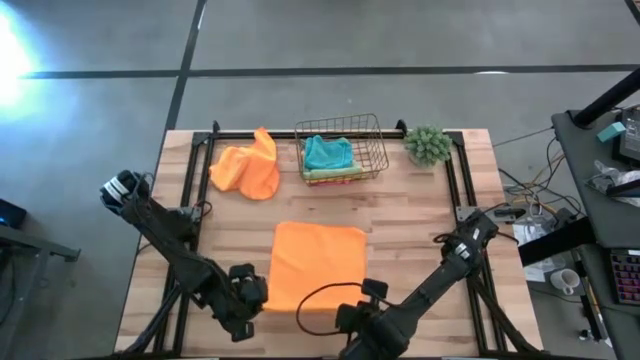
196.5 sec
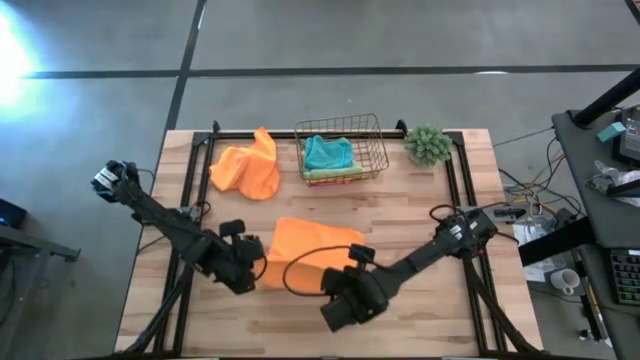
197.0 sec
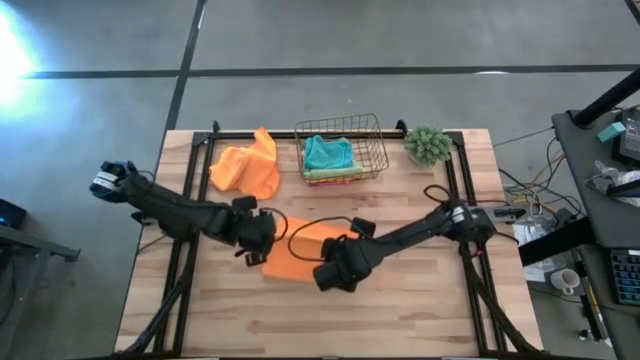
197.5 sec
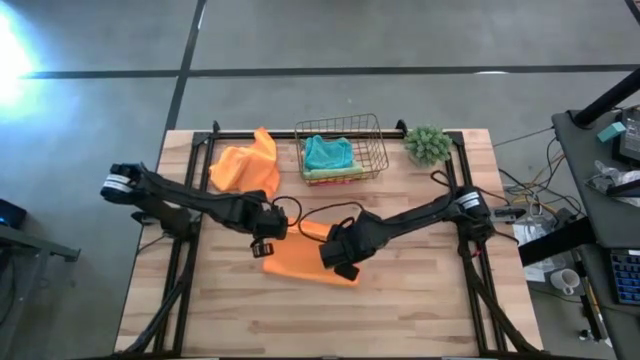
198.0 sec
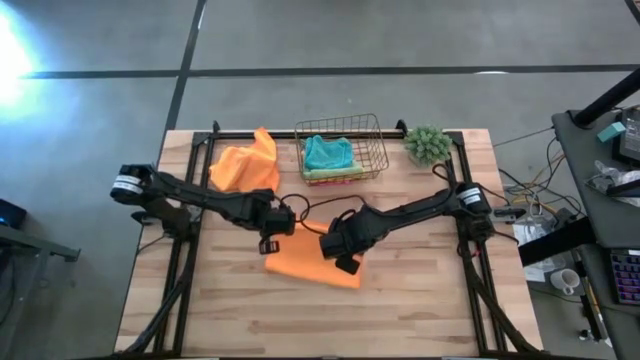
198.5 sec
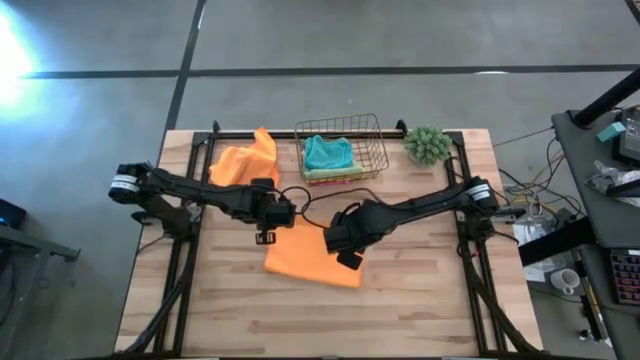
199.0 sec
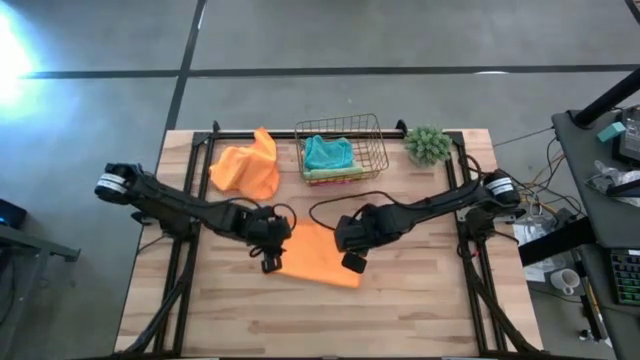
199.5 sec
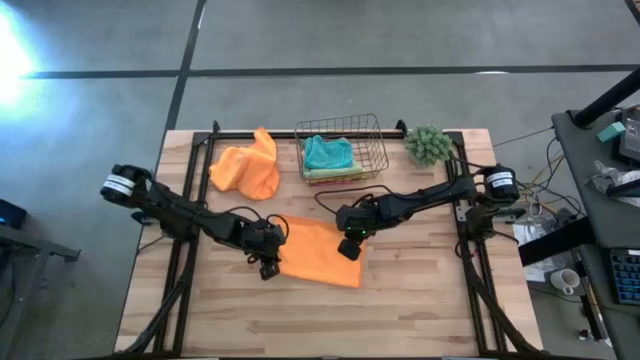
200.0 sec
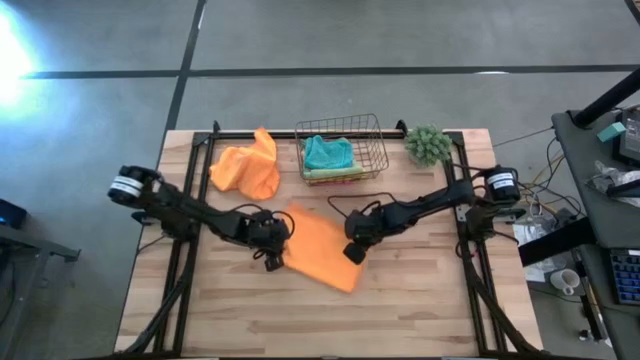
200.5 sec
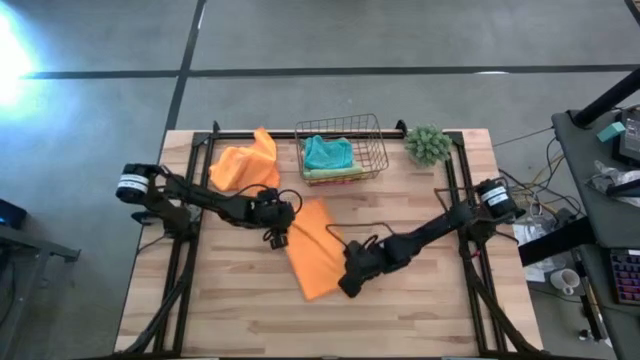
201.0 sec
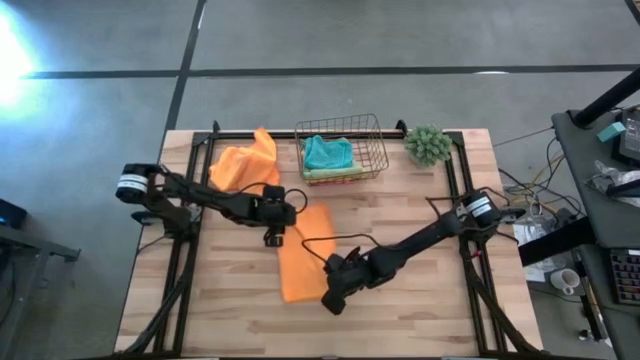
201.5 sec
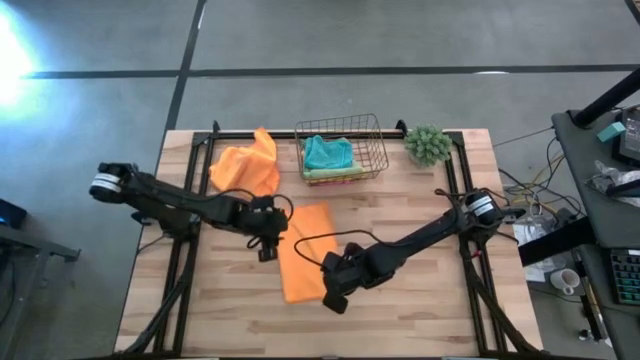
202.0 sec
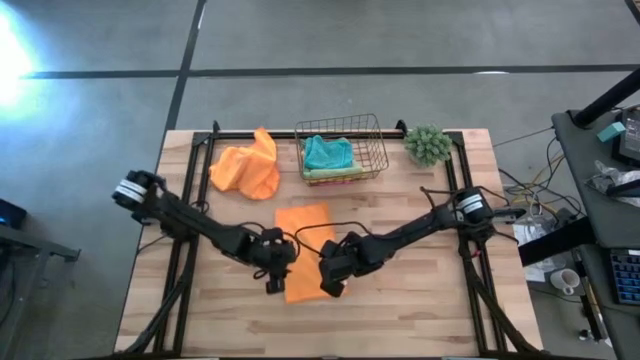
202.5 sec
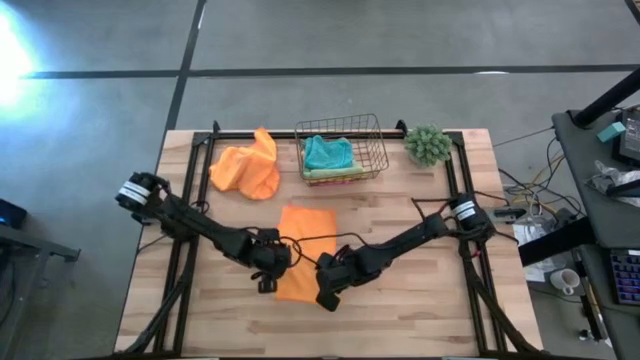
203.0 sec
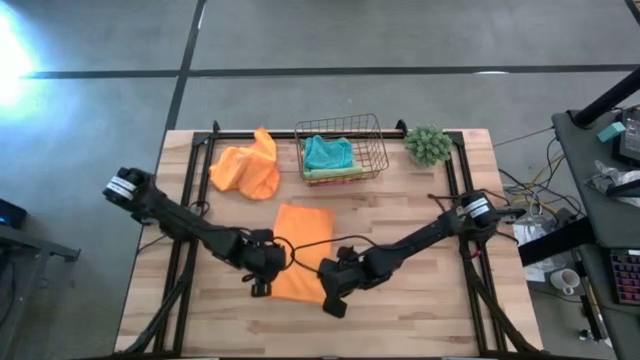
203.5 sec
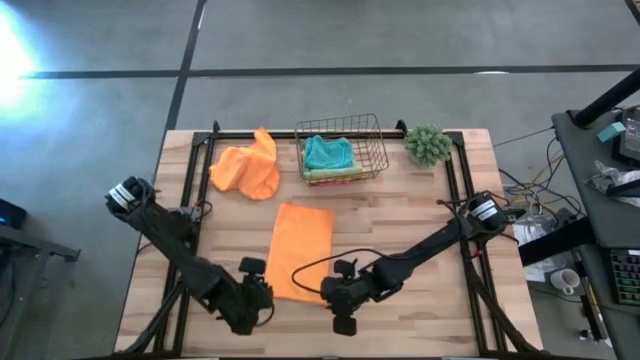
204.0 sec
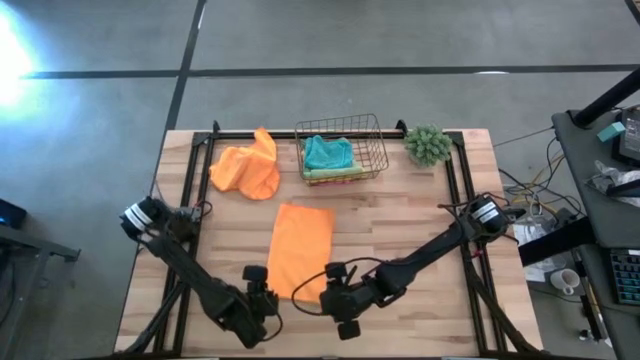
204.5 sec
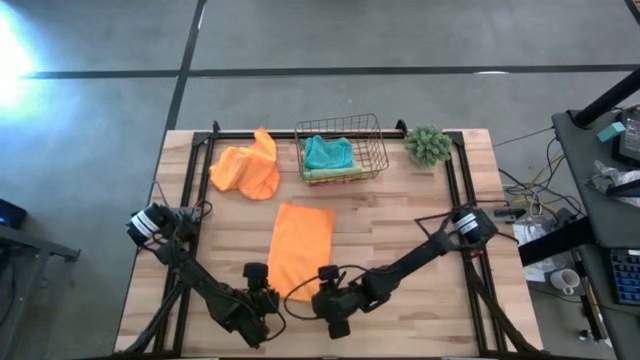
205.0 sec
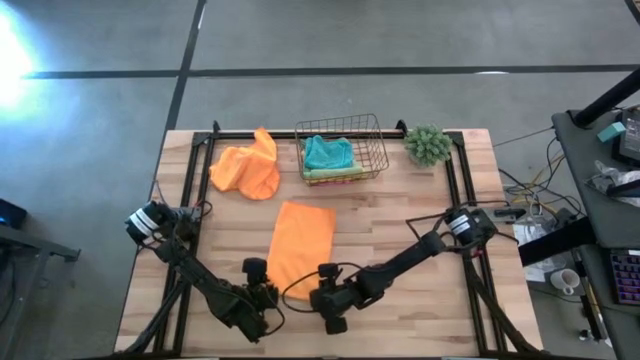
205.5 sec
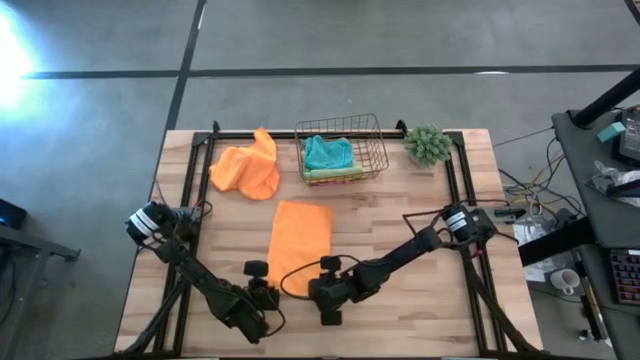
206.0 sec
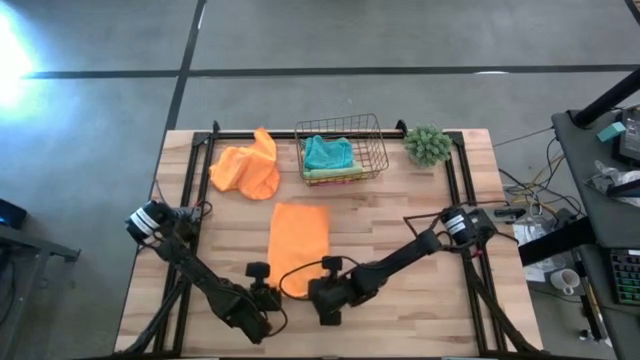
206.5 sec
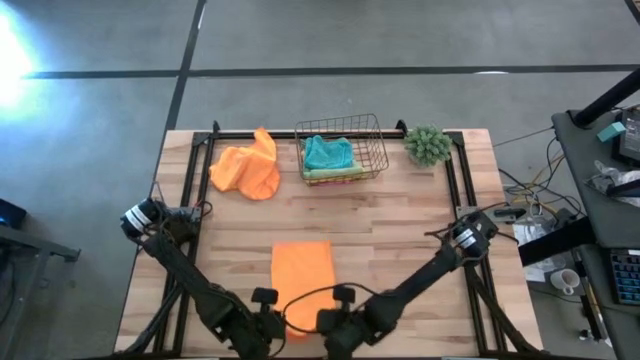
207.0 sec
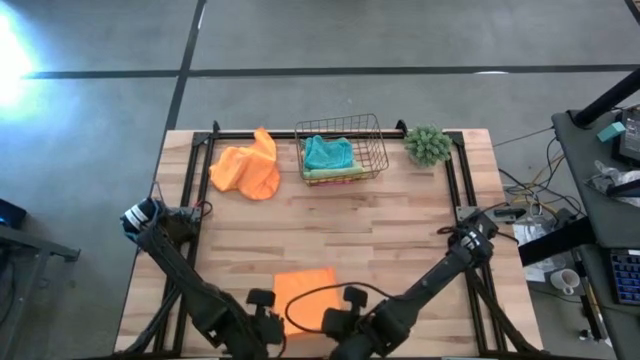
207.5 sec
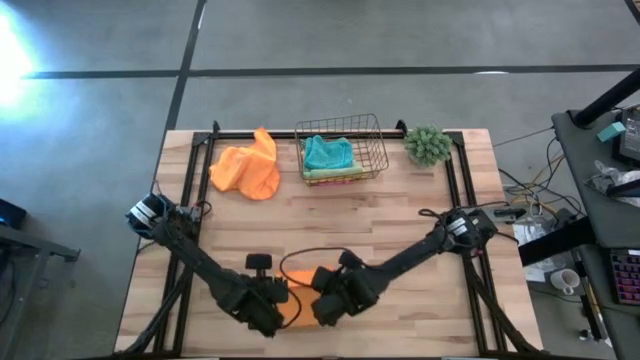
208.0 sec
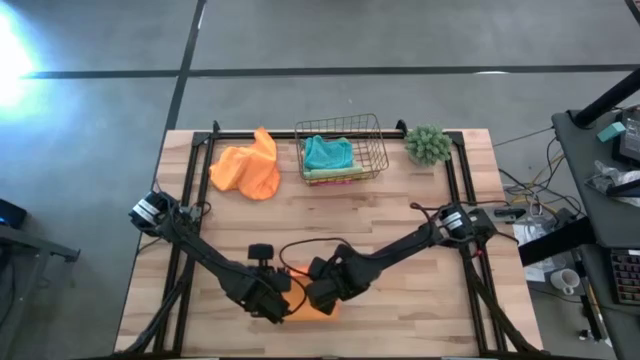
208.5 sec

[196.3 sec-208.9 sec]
Task: Fold microfiber towels
Fold the bottom orange microfiber cloth

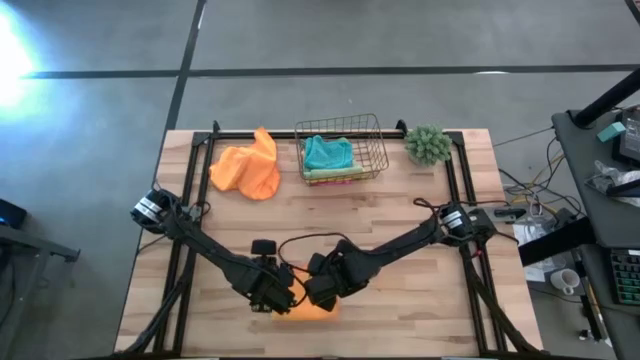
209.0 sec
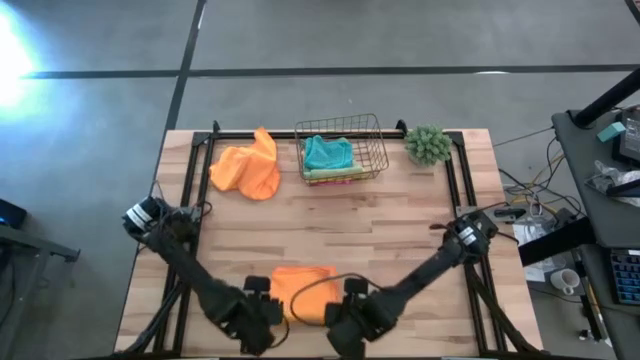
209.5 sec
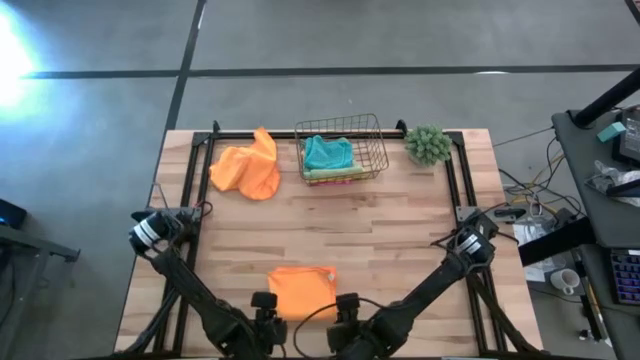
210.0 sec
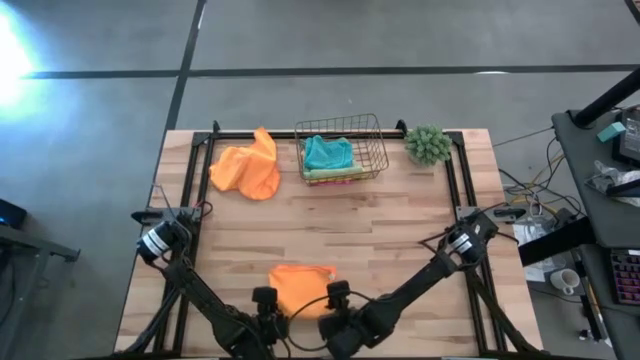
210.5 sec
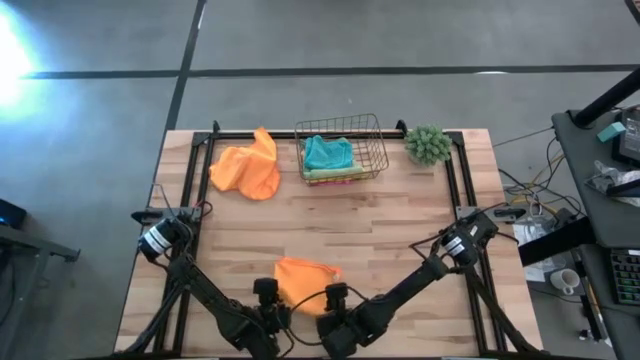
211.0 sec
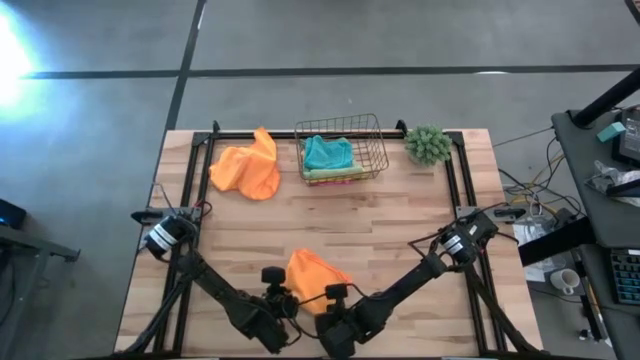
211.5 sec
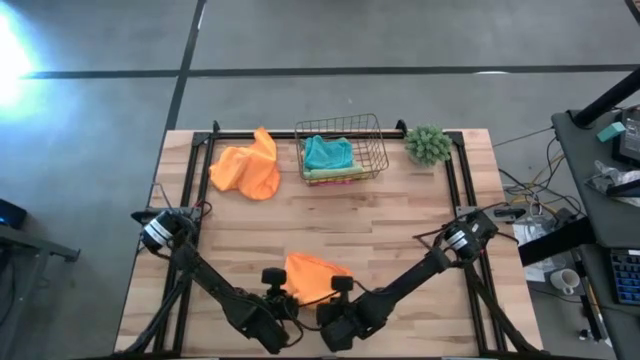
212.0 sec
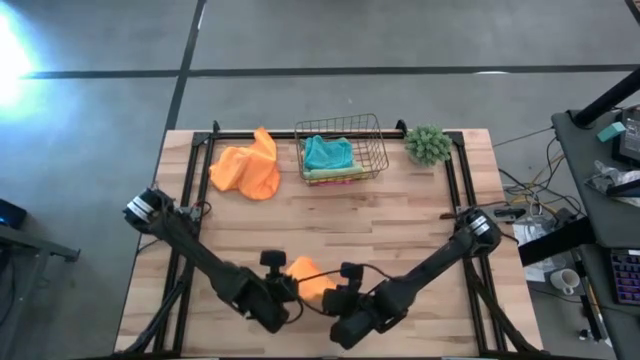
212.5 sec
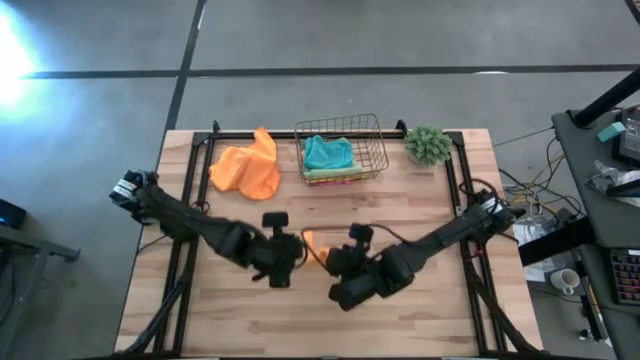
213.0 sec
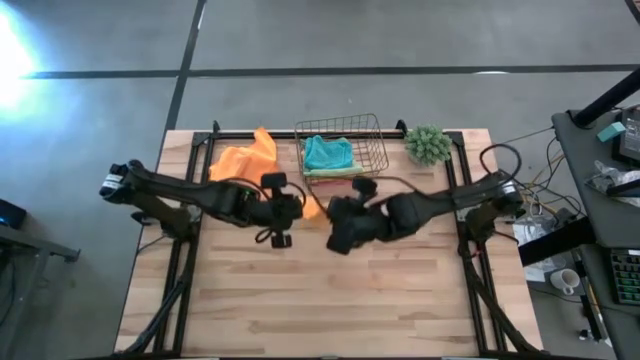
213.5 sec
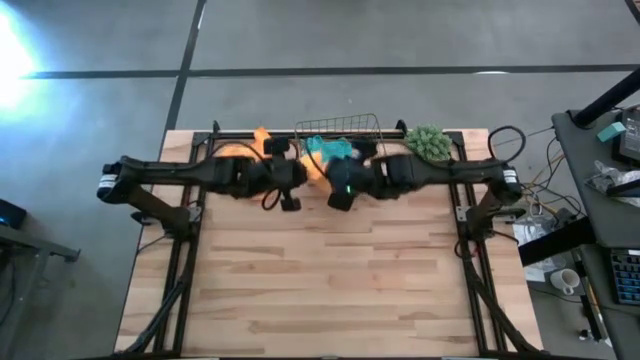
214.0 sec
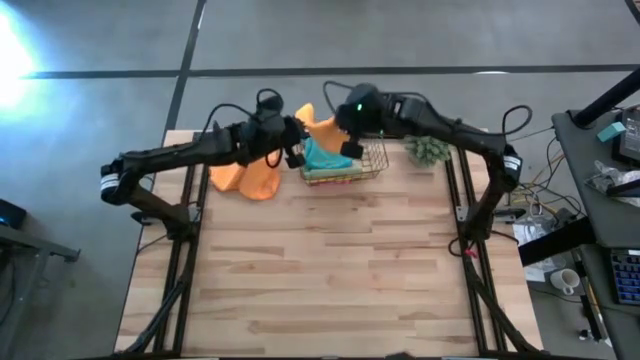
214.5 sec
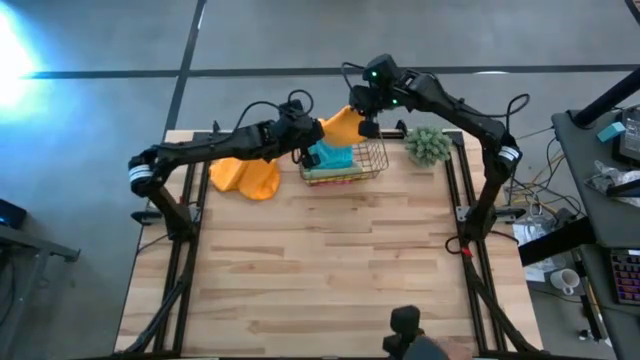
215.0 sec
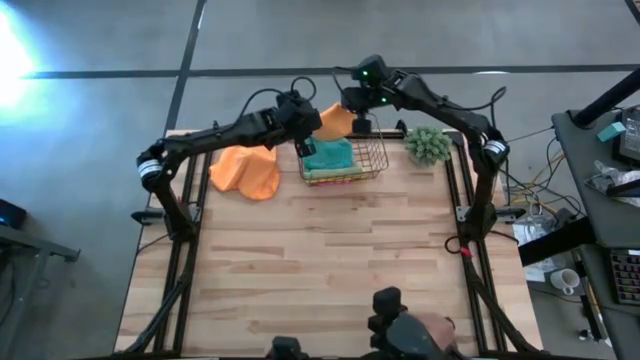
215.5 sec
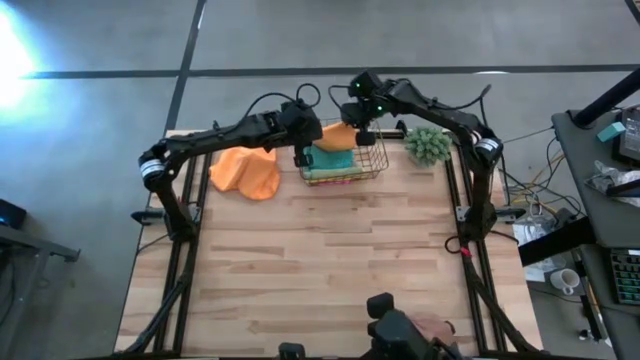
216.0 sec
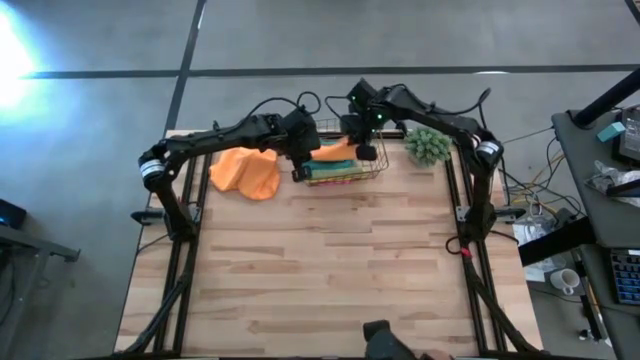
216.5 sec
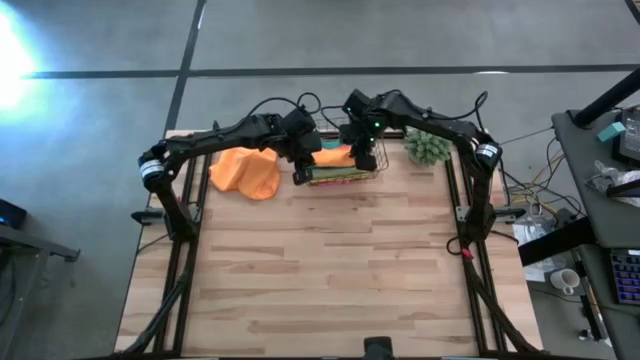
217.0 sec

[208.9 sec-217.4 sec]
Put the bottom folded orange microfiber cloth into the gold wire basket

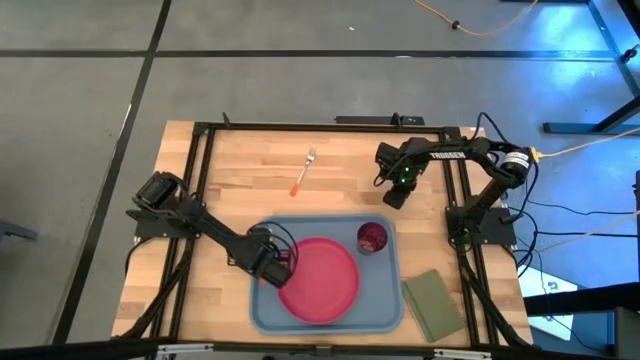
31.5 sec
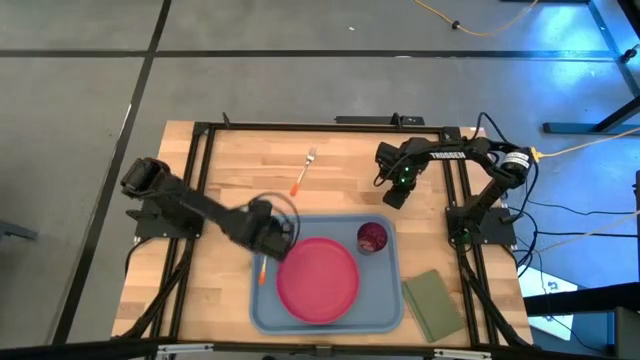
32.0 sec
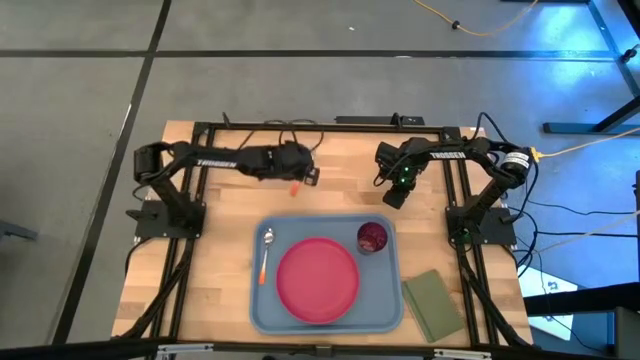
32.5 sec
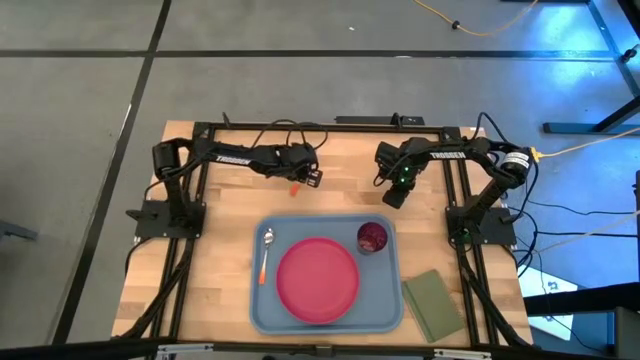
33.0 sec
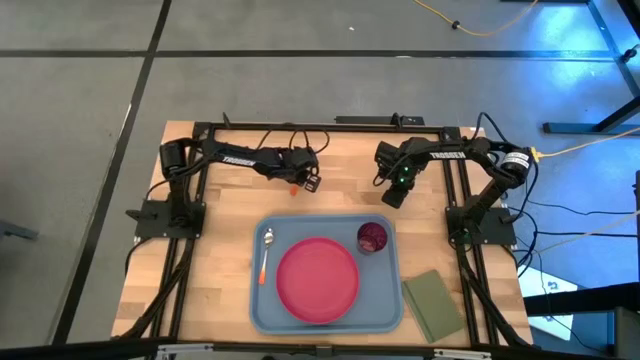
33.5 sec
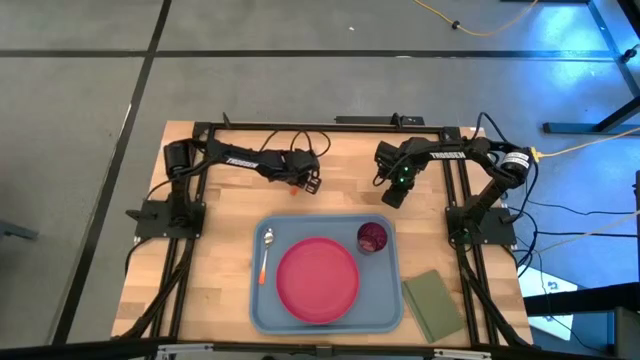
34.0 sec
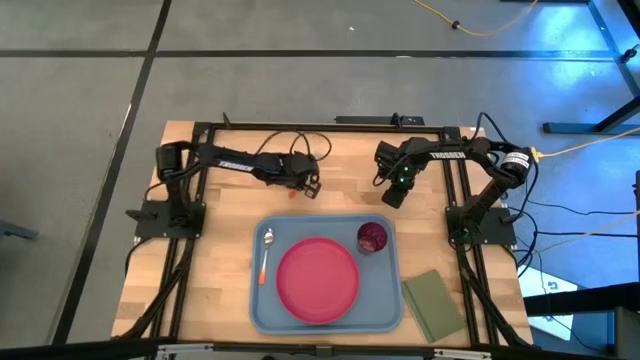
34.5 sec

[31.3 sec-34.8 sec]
Task: Pick and place plate/cup/fork/spoon on tray
Put the orange white fork on the blue tray to the right side of the orange white spoon
